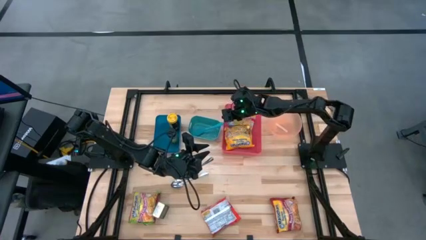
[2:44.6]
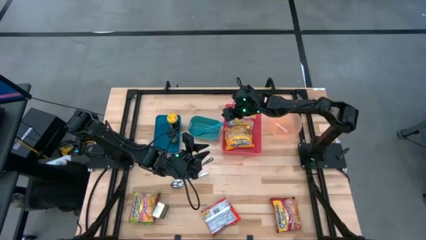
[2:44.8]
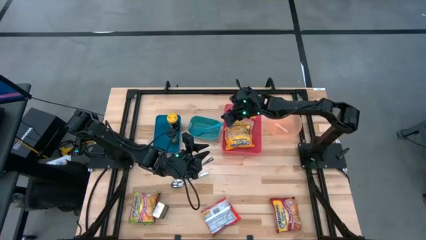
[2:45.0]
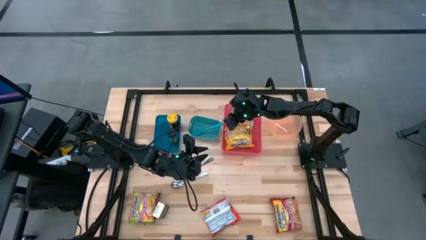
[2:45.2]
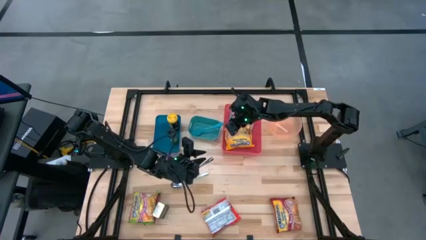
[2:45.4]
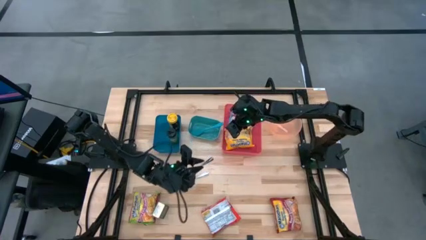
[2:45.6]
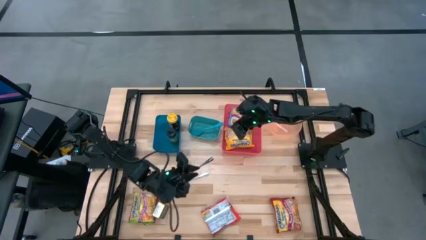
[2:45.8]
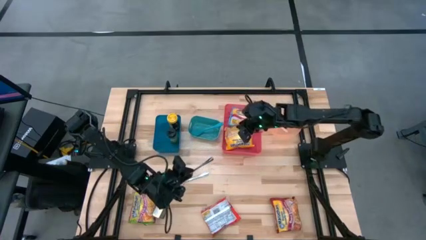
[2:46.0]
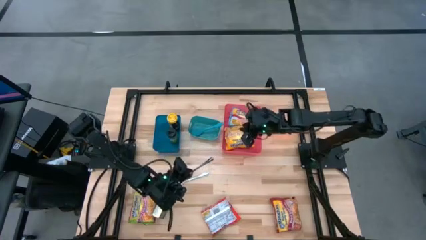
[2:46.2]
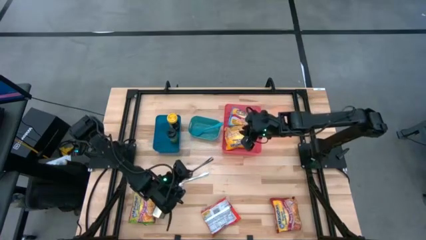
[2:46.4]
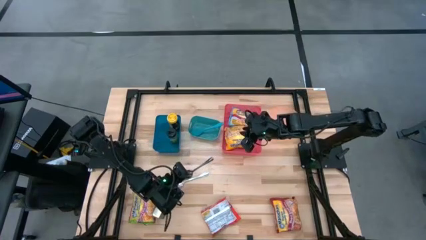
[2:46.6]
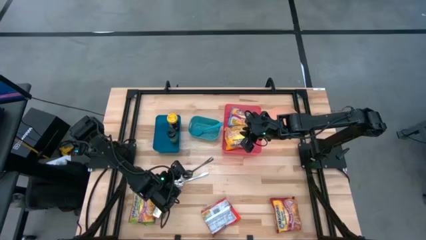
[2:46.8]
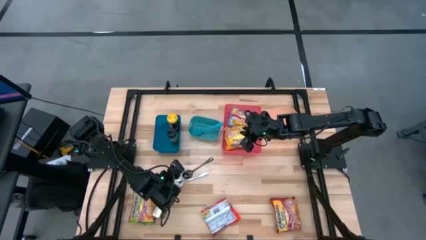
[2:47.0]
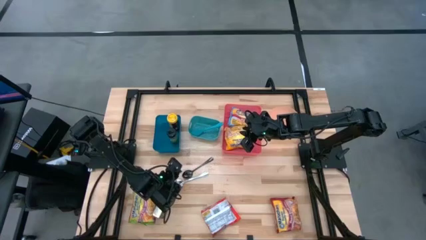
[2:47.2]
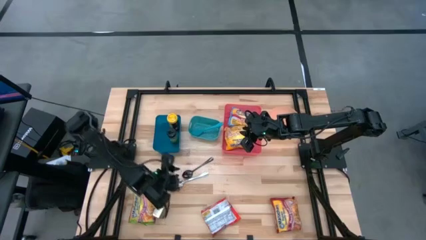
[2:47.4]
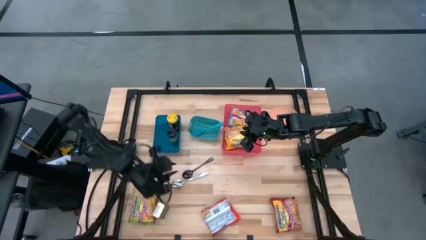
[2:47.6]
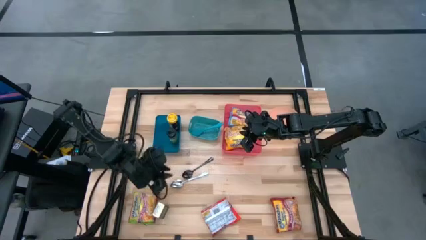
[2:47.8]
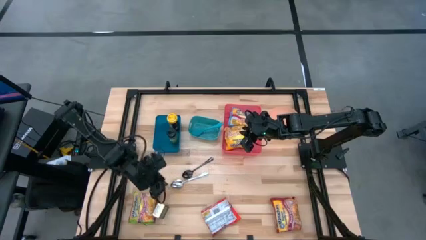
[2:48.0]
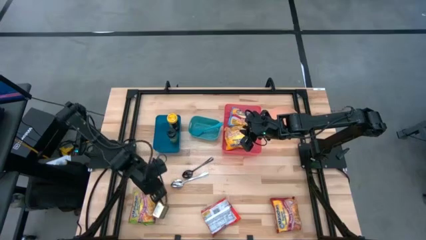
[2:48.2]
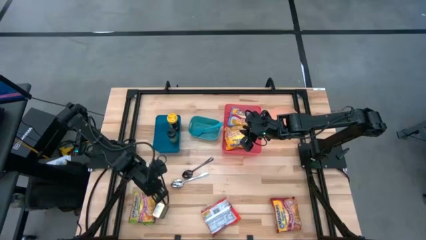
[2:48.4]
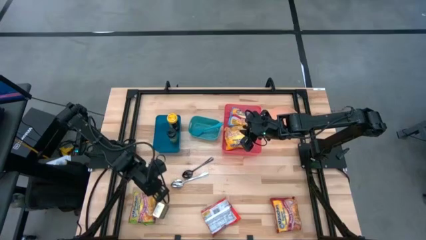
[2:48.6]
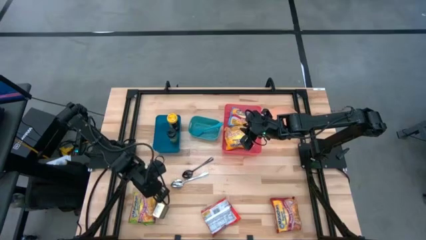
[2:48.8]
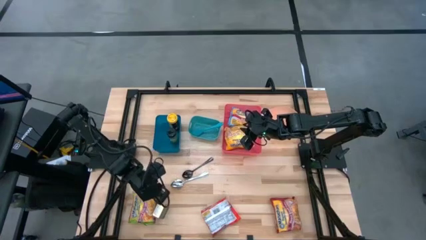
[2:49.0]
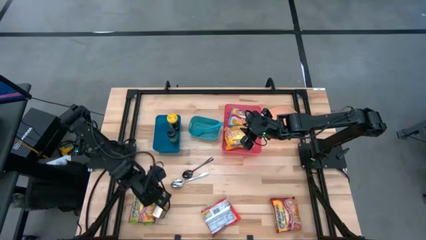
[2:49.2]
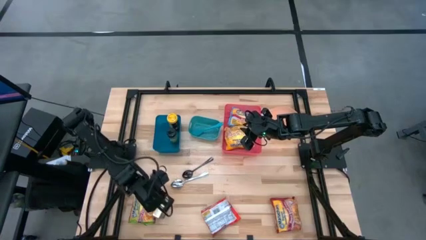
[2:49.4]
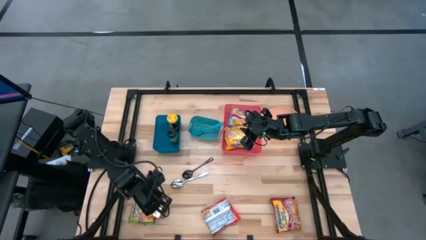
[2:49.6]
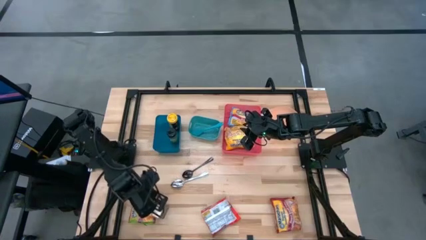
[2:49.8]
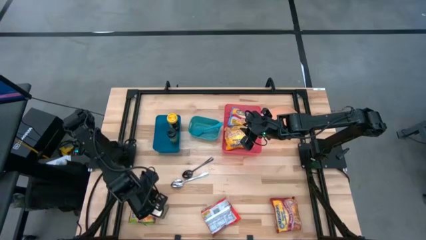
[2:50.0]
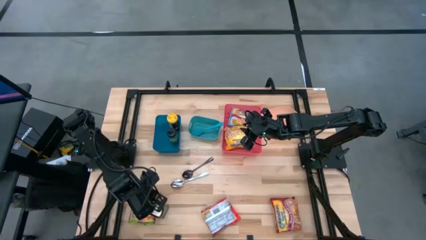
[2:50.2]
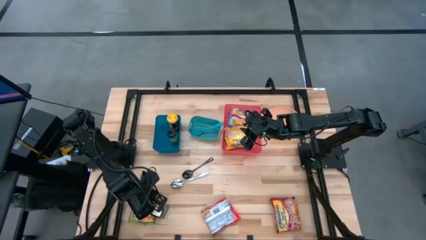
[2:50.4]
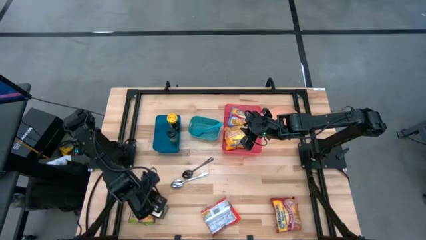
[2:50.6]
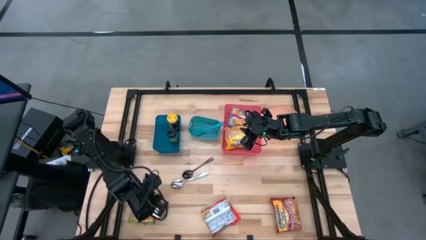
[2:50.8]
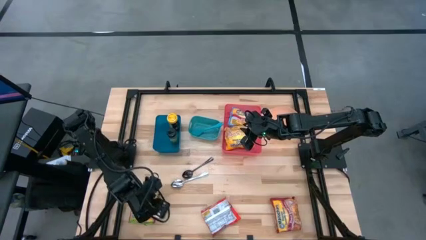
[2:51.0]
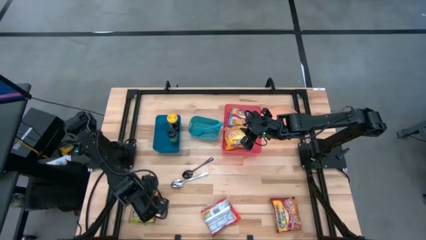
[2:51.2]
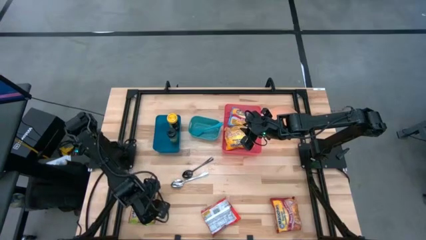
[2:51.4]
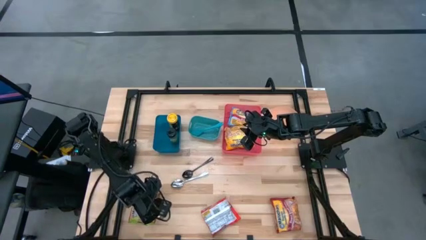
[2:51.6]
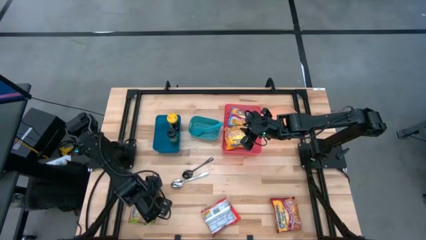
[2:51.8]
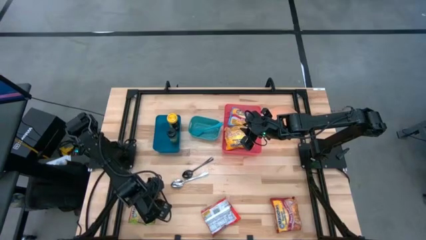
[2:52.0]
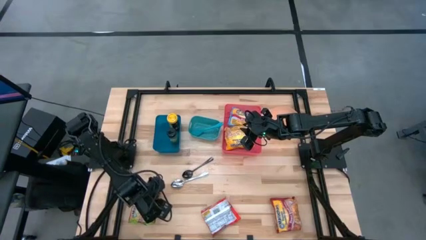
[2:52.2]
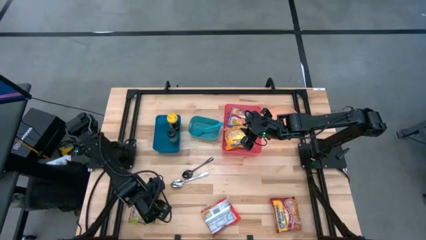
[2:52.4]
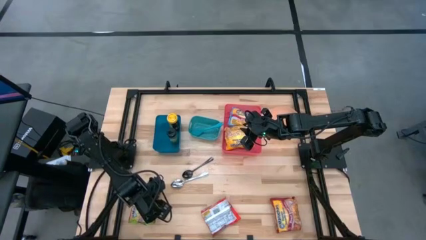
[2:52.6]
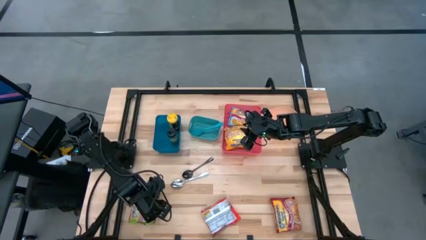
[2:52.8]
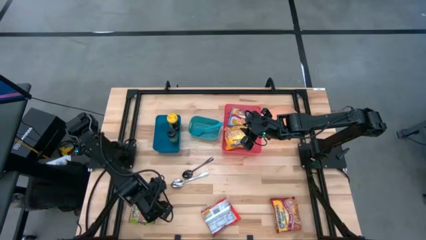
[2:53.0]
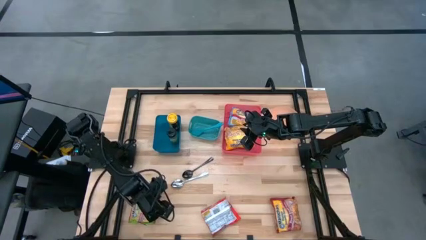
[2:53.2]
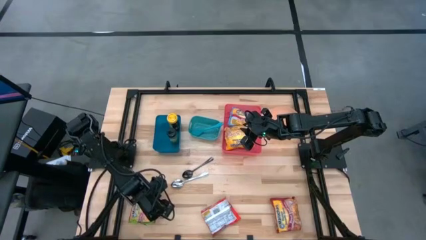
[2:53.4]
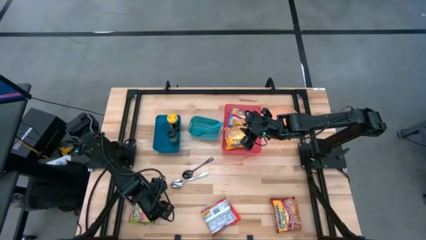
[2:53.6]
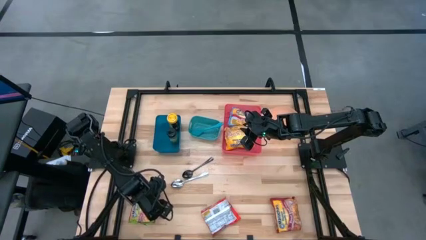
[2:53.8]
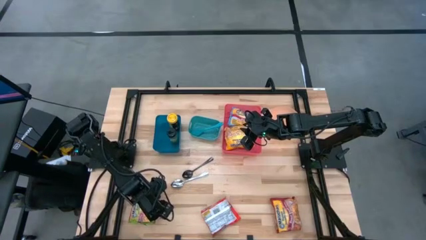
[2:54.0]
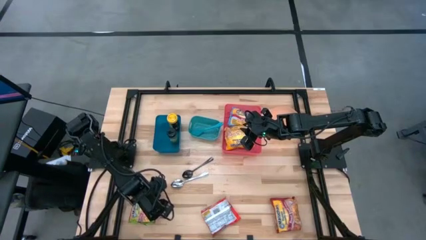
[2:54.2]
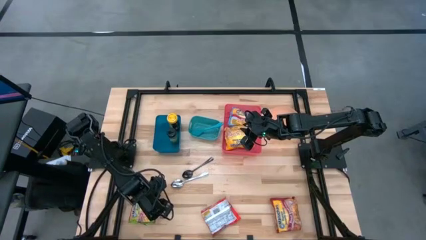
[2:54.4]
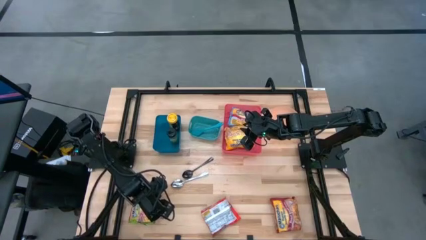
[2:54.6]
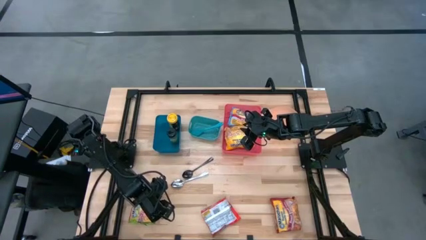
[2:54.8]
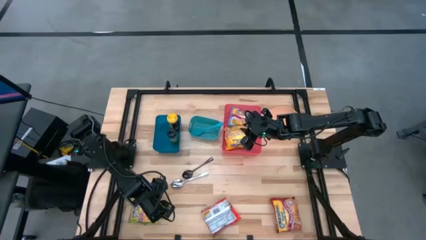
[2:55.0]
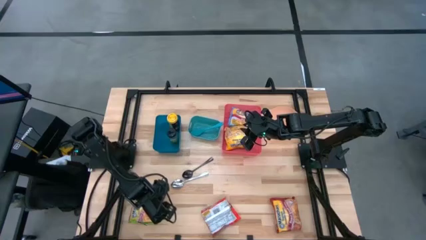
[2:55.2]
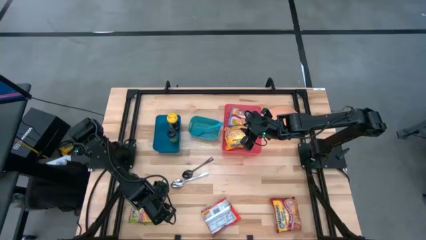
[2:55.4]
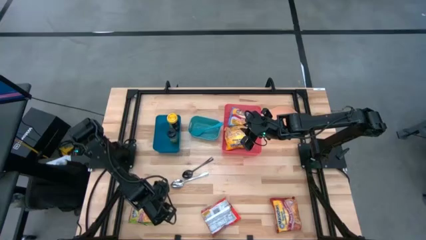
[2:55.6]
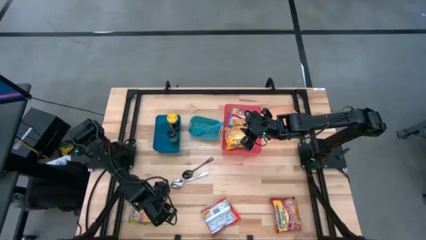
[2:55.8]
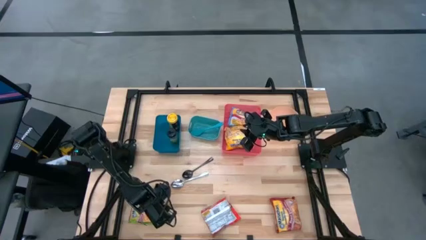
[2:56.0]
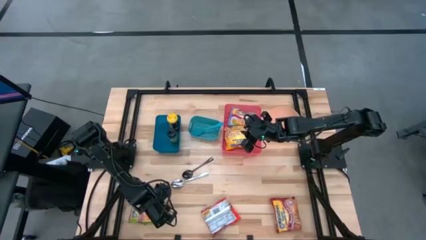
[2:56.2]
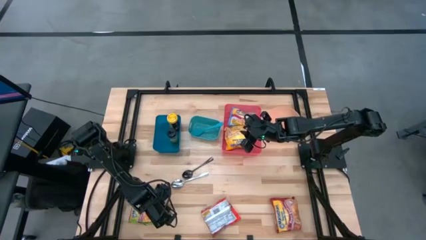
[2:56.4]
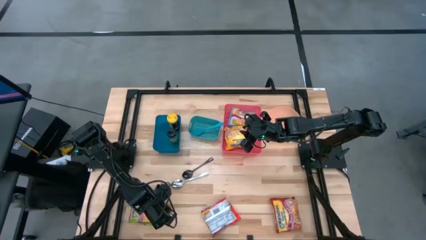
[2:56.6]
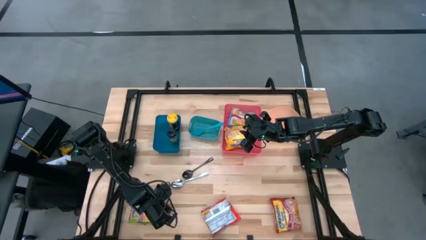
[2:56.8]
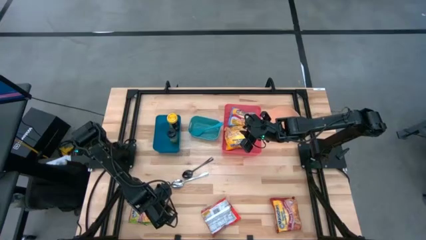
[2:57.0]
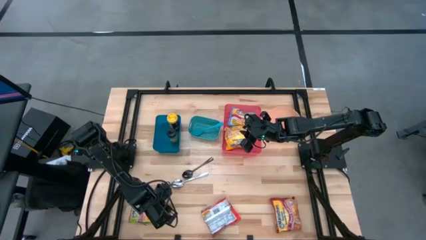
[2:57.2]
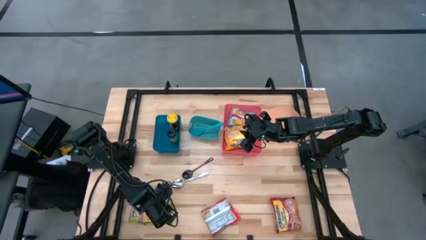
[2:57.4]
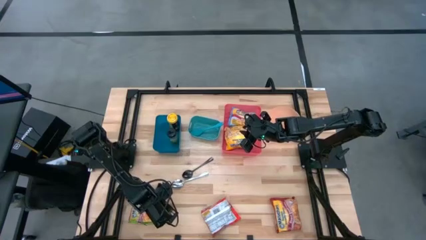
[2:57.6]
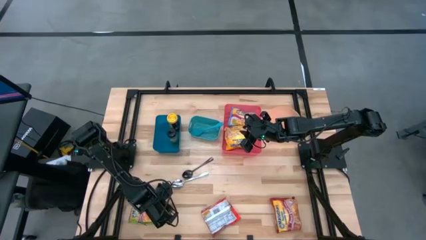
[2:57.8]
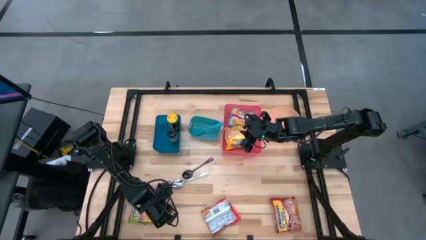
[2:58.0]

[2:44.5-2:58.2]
Task: Pick & Place Food Item
Put the black seasoning can into the blue bin

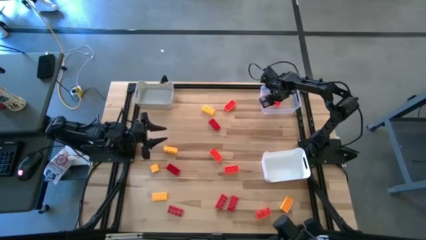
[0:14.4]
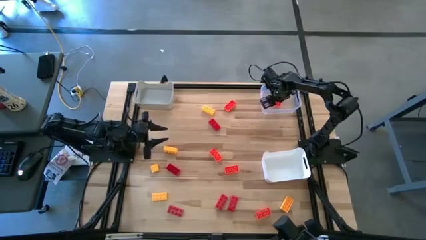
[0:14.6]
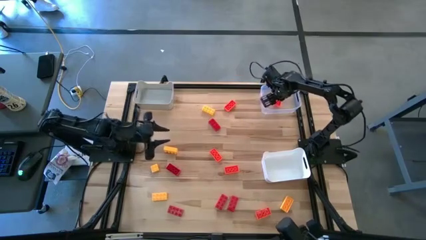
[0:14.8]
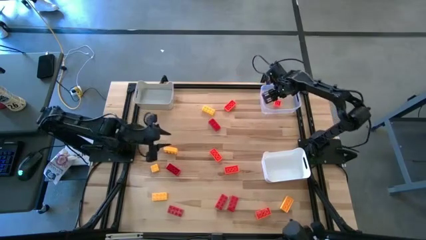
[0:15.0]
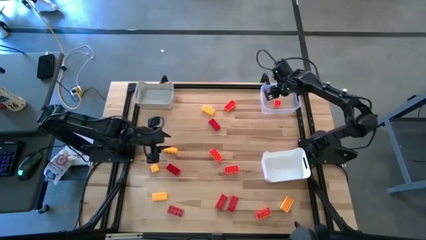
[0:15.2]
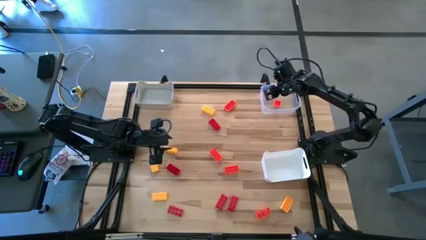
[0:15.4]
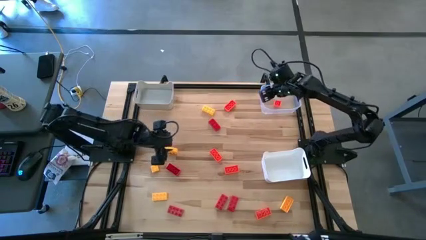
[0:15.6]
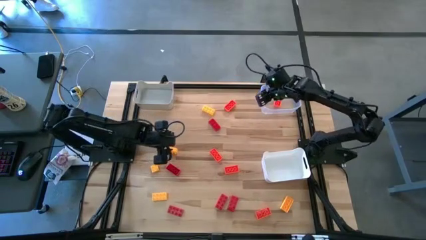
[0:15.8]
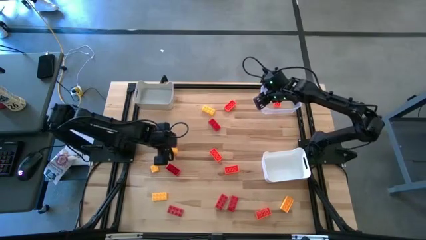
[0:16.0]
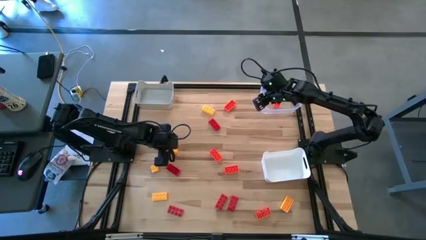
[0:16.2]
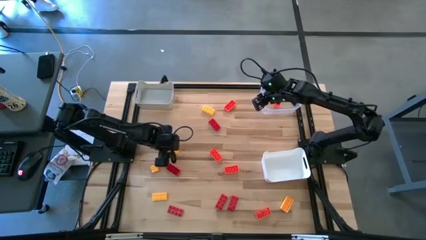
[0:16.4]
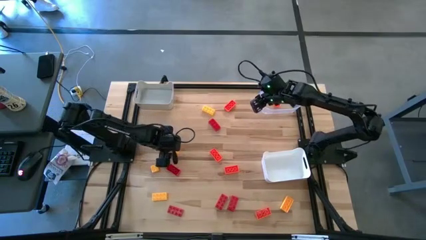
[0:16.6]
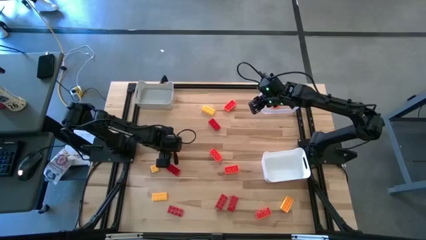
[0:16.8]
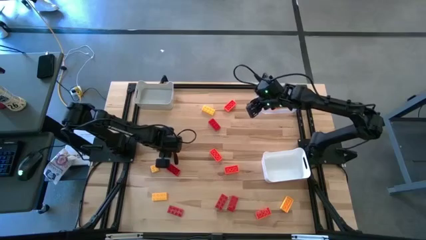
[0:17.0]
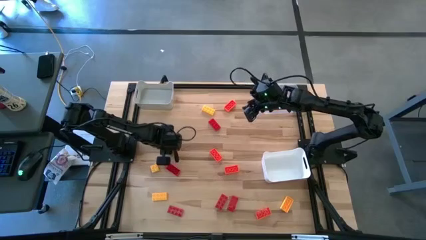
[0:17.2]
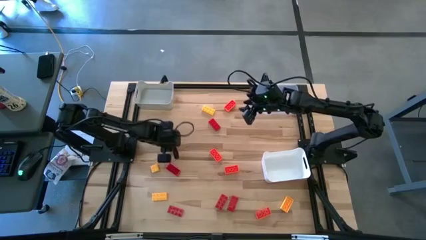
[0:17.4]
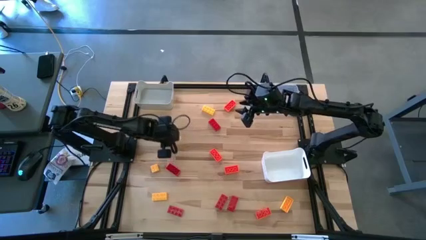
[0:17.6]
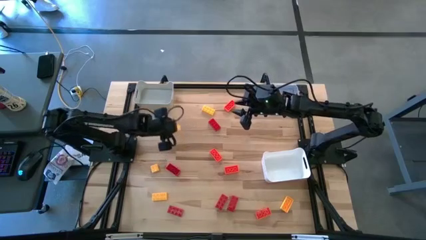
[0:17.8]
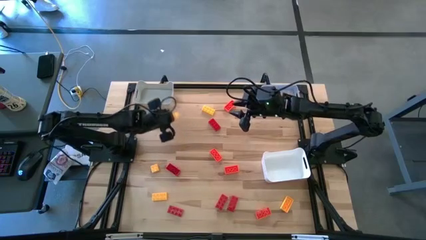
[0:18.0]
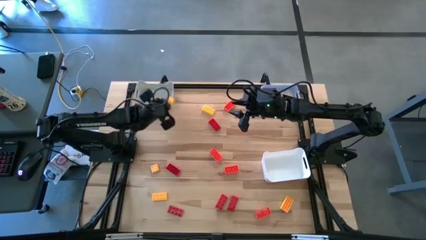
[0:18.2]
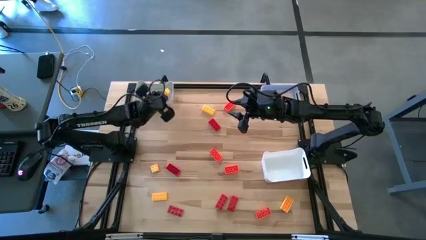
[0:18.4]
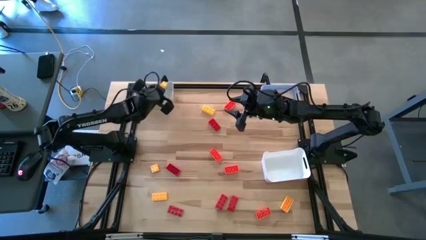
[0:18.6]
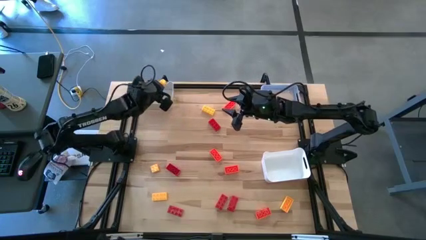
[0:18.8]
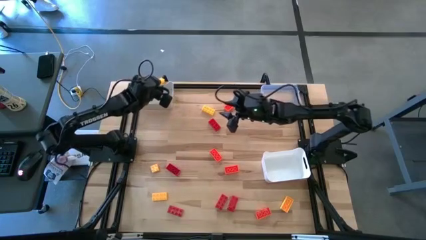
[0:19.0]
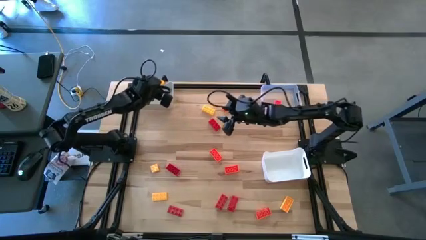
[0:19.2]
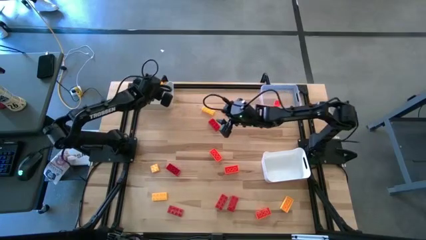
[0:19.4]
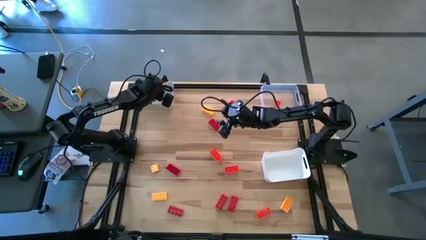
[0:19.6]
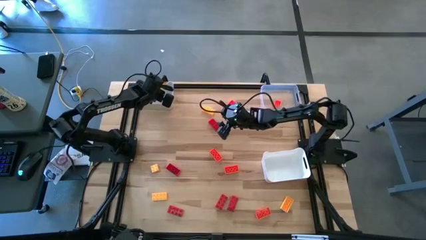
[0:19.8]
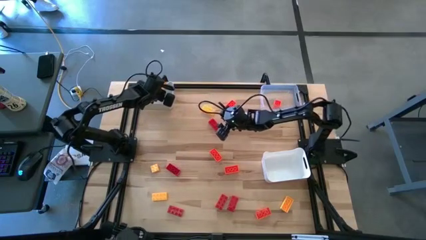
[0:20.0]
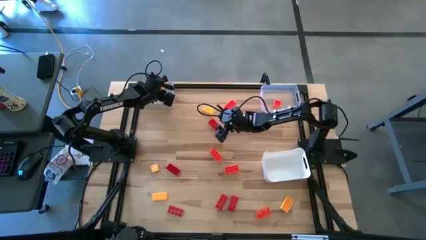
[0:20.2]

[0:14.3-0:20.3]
Task: Sort & place blocks by color
Put the yellow block into the gray bin
